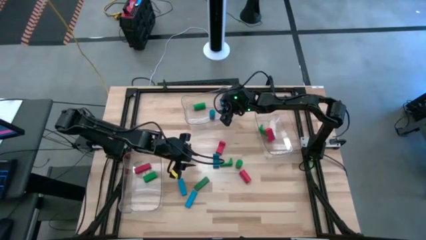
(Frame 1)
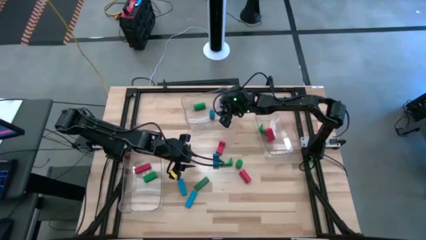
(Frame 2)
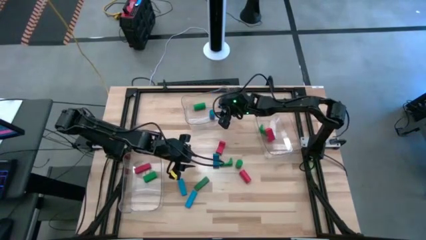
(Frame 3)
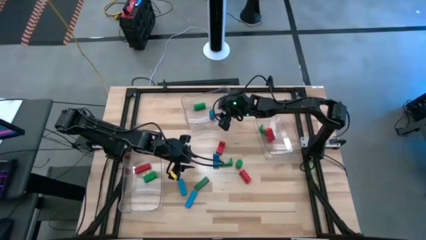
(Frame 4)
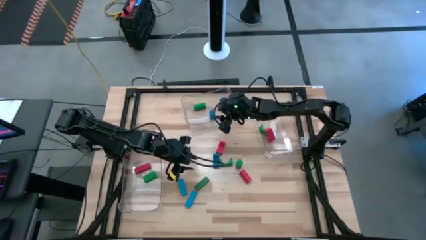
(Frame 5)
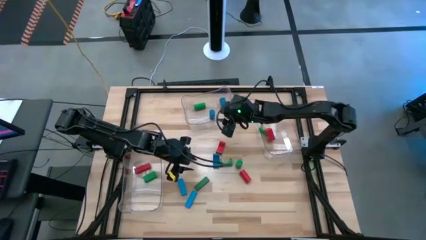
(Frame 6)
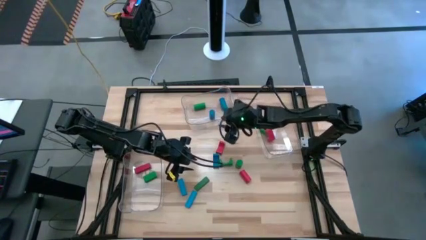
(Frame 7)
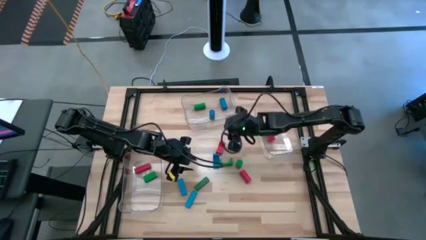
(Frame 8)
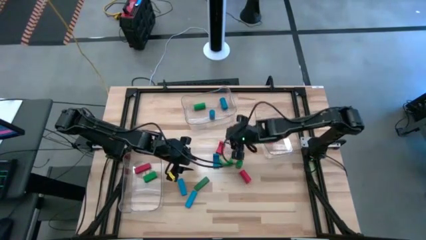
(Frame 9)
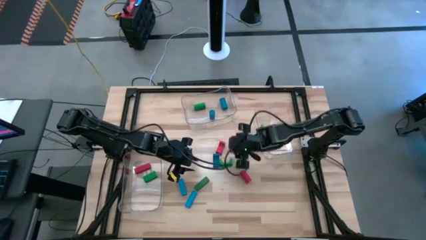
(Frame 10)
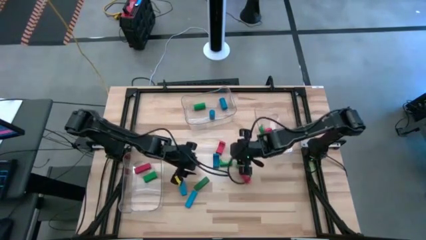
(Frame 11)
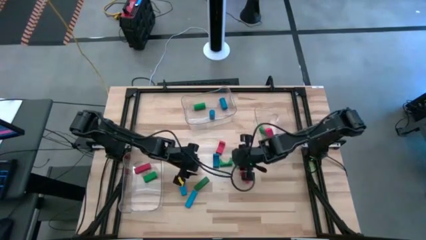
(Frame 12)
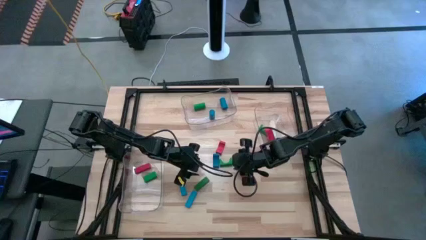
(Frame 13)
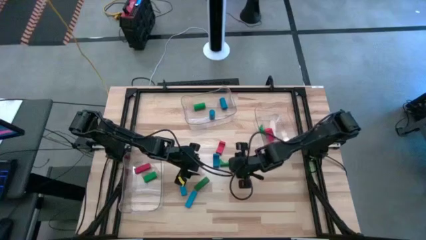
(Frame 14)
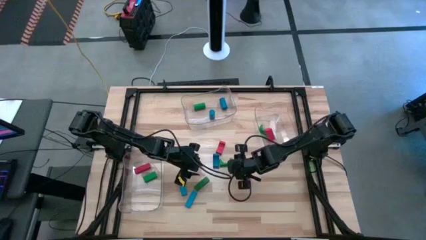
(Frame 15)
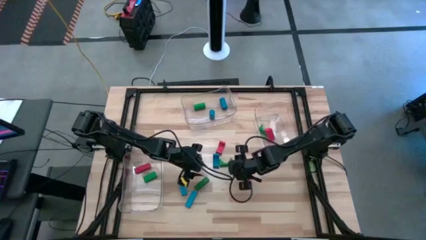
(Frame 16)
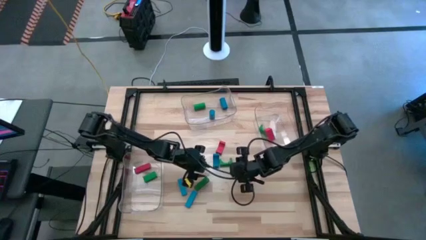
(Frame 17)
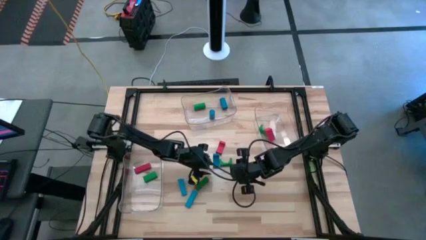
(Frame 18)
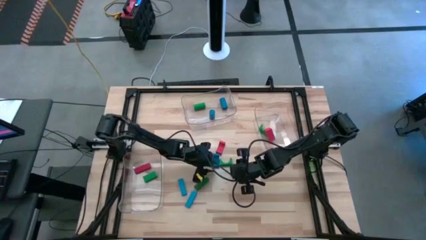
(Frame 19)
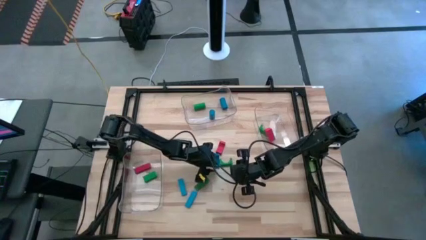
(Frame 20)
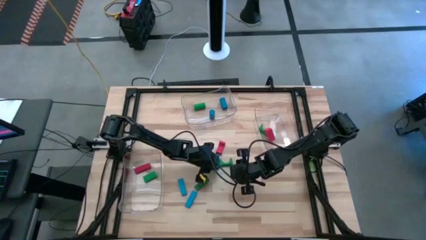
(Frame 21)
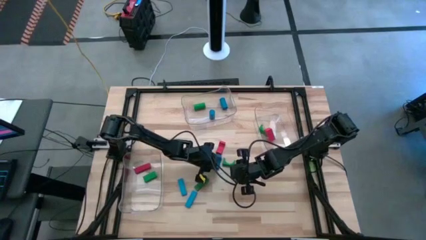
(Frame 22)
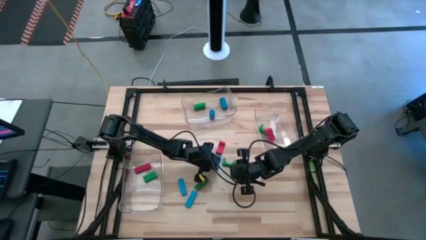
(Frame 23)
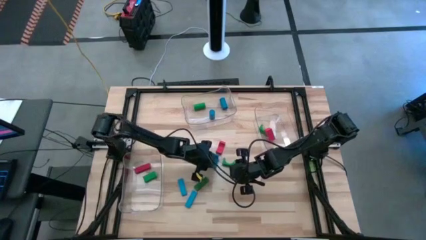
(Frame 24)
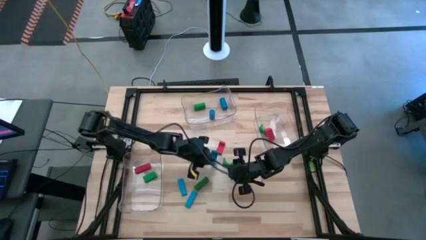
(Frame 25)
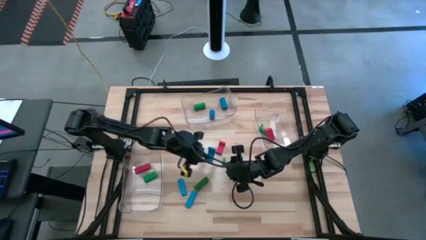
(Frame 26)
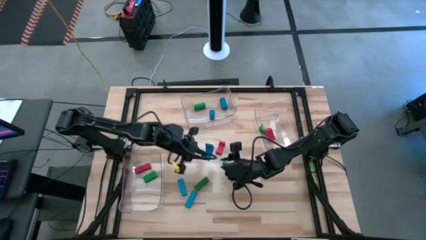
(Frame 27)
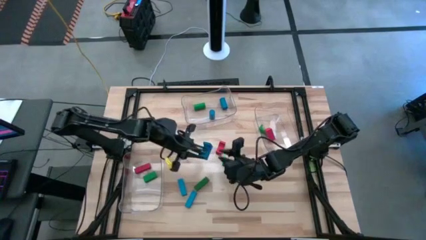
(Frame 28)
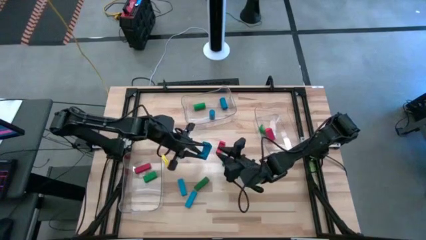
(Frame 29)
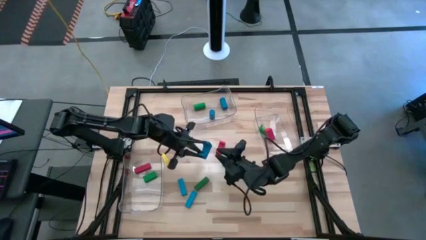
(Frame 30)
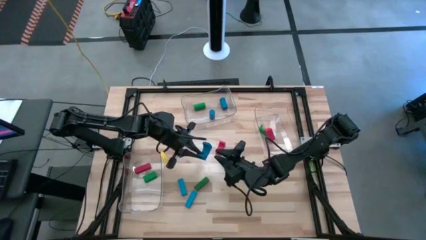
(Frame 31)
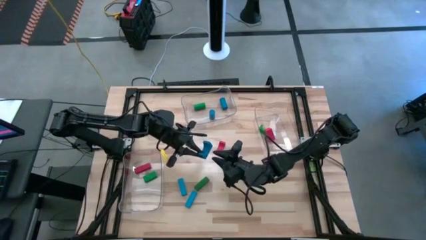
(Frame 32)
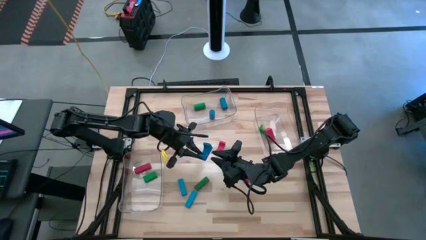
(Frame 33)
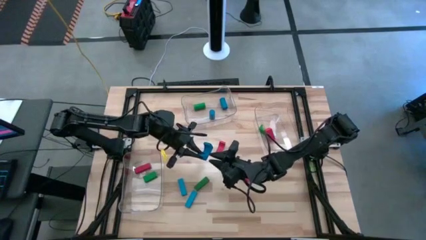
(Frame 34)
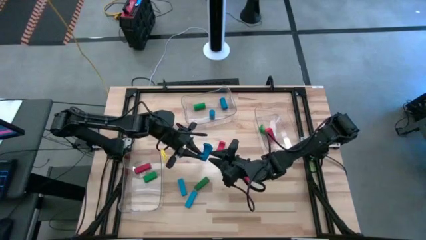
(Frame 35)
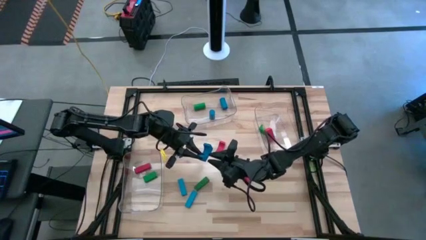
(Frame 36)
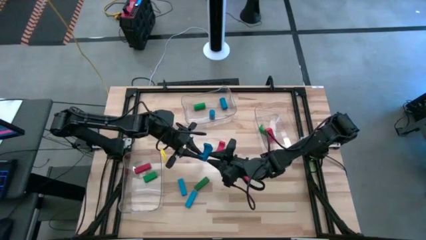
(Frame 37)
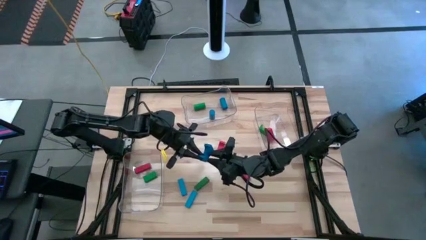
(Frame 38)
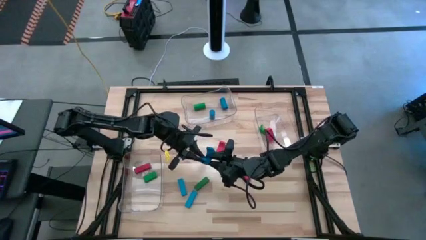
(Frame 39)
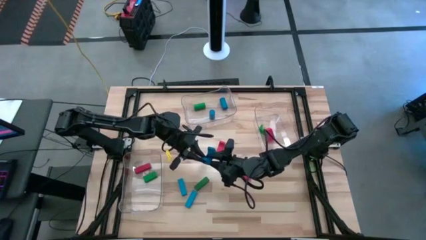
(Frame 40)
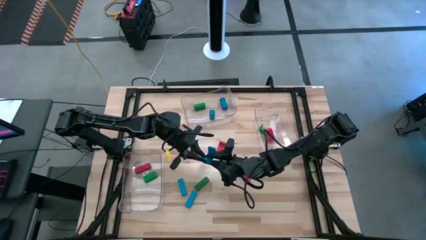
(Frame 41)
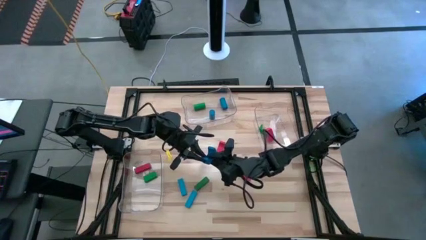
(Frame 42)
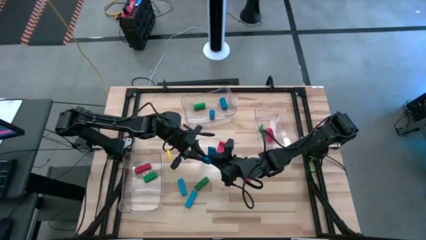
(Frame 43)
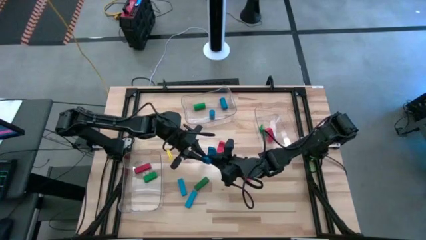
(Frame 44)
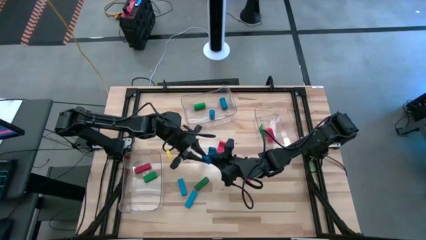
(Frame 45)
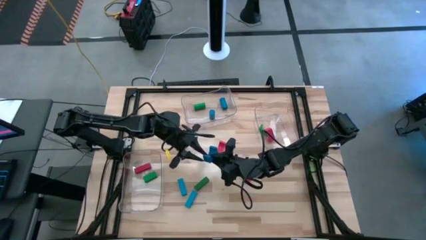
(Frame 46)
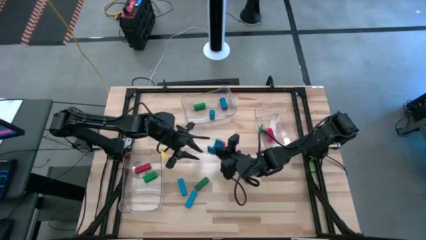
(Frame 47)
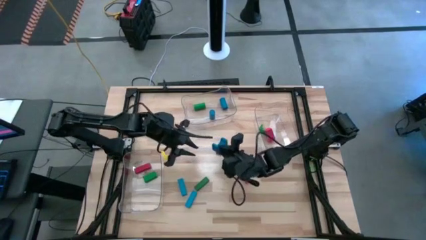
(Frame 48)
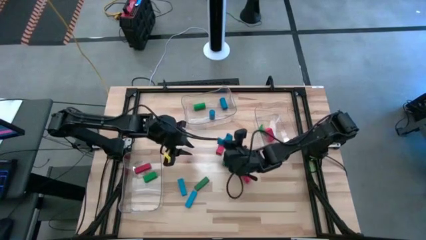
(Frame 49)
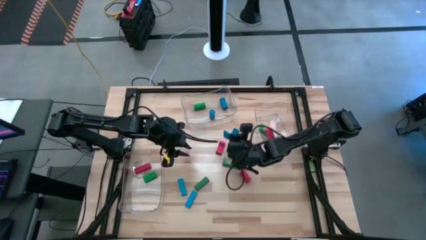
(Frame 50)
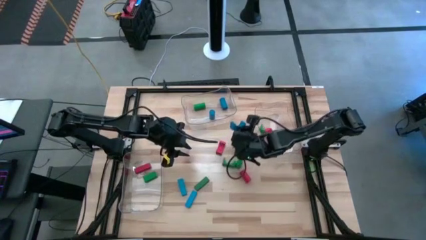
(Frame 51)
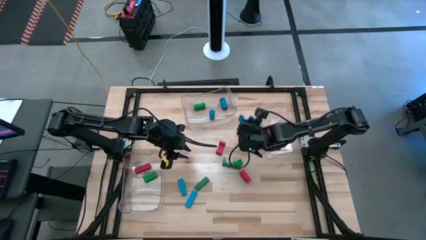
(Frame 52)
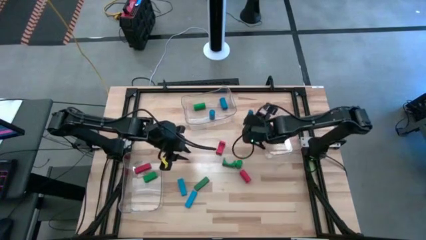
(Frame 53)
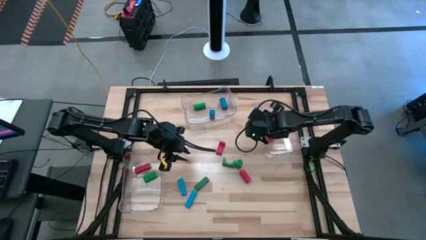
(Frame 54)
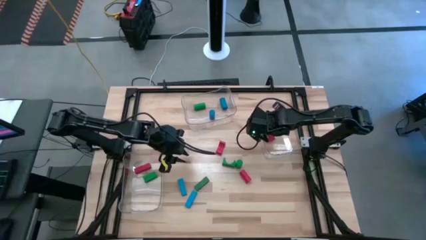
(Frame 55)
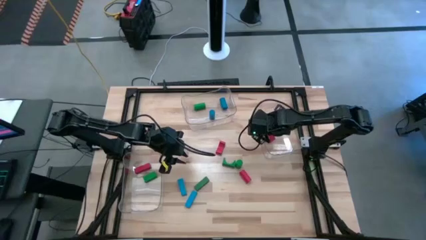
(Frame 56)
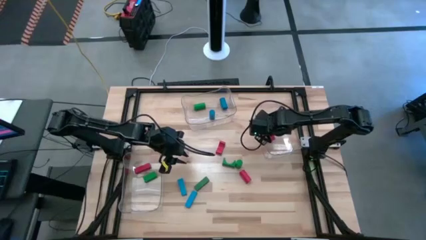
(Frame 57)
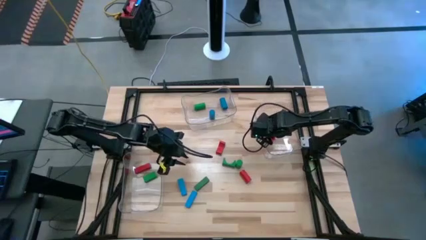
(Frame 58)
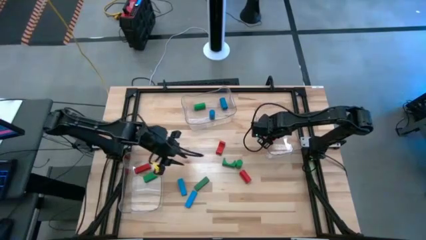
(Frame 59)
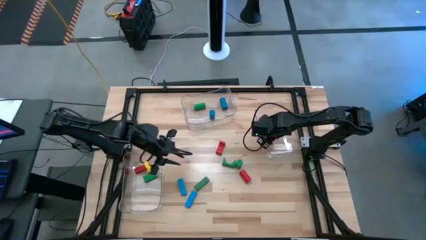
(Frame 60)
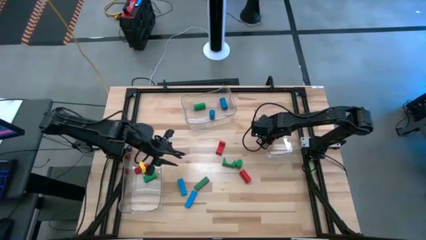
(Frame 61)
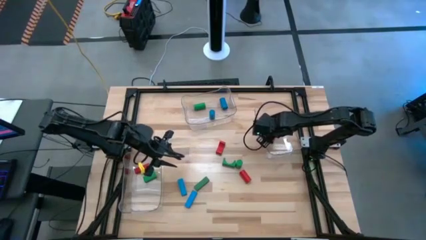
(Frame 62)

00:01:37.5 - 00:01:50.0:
Task: Sort blocks by size
Put the blue arch block into the right transparent bin
